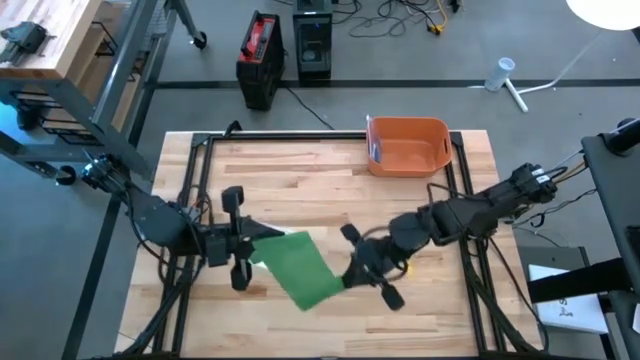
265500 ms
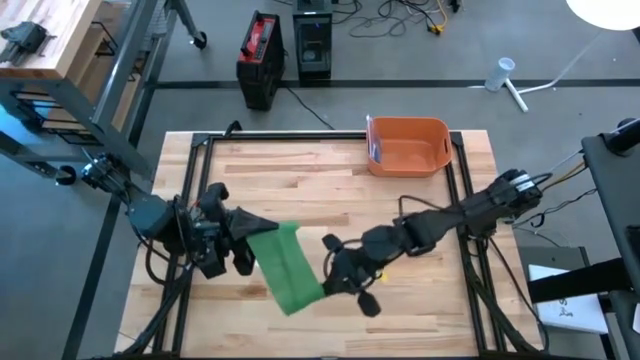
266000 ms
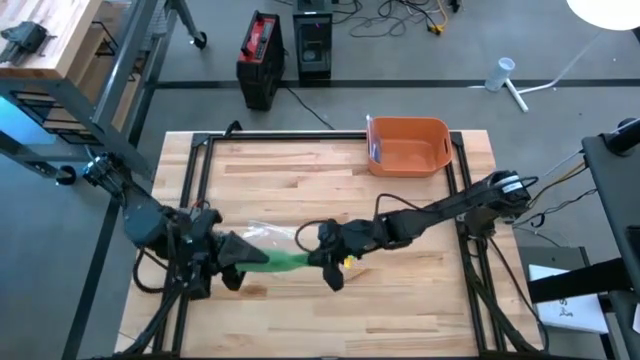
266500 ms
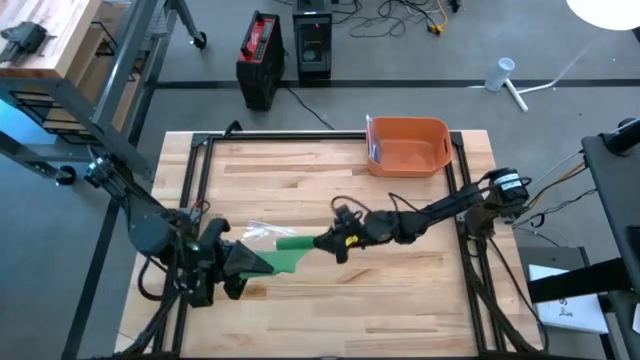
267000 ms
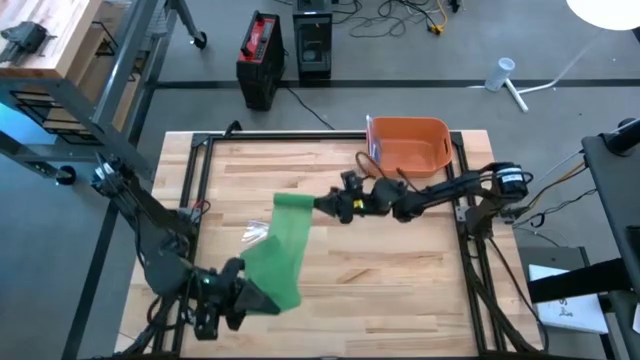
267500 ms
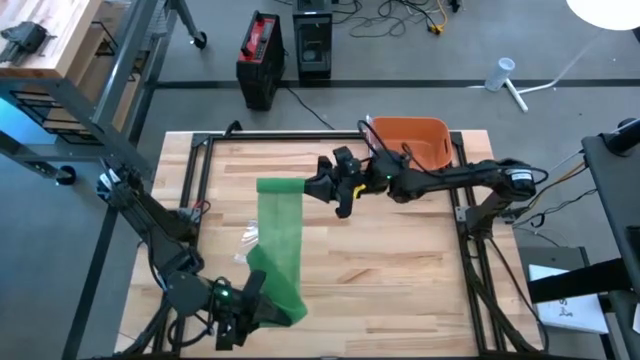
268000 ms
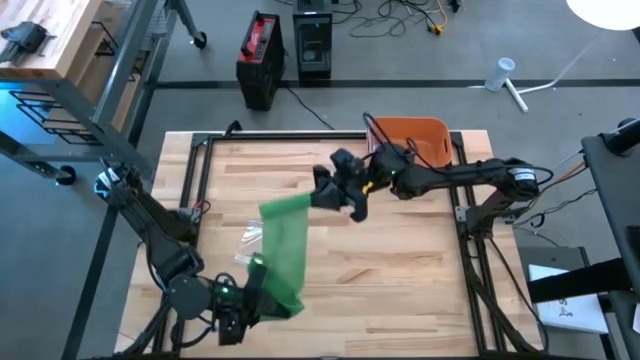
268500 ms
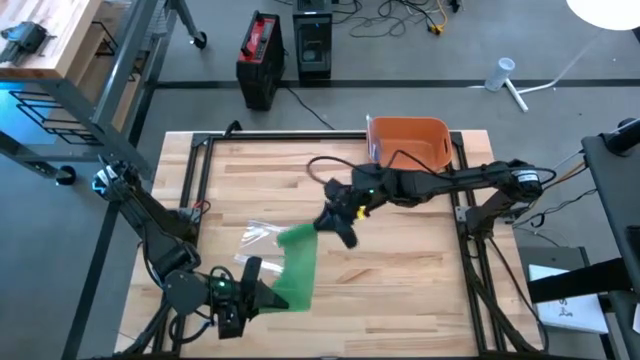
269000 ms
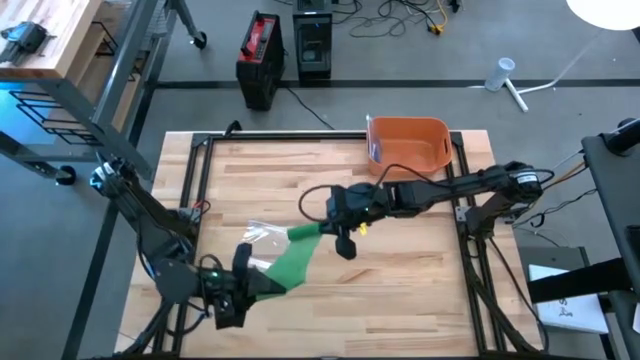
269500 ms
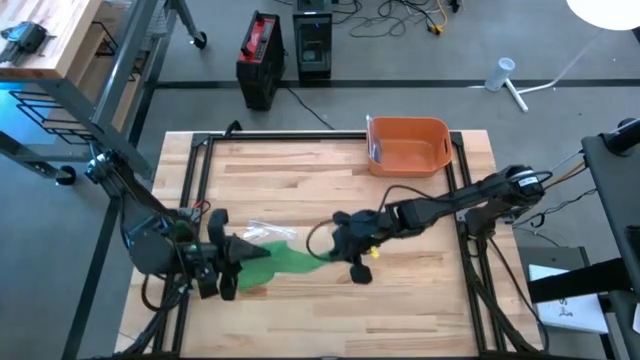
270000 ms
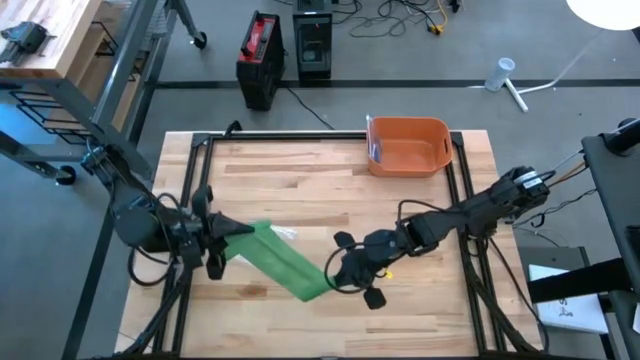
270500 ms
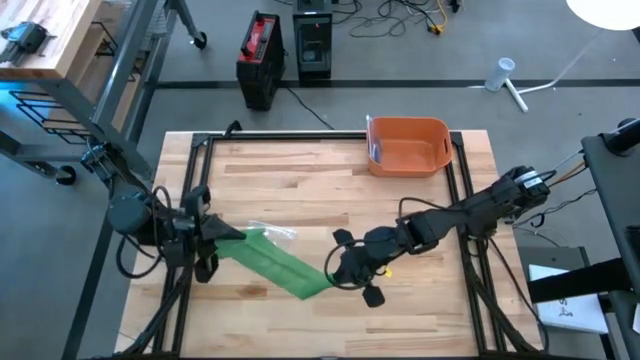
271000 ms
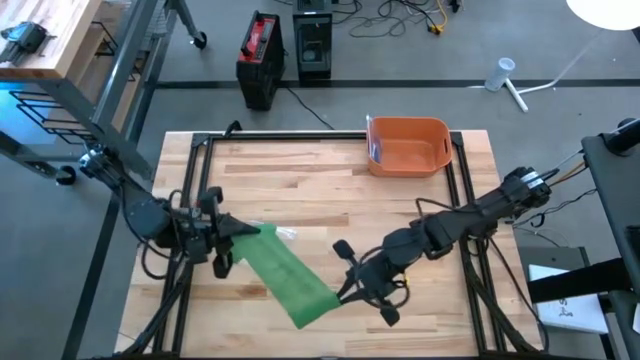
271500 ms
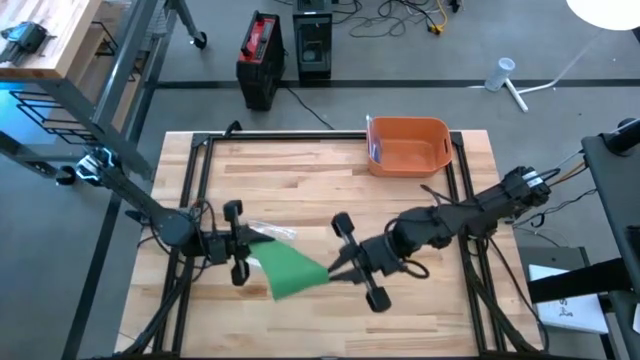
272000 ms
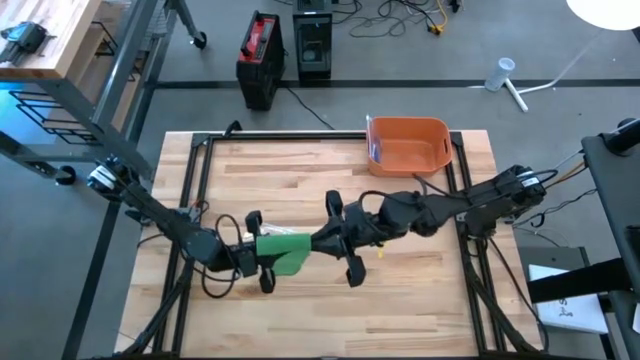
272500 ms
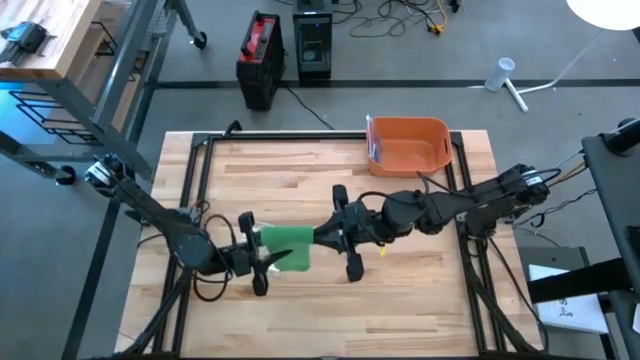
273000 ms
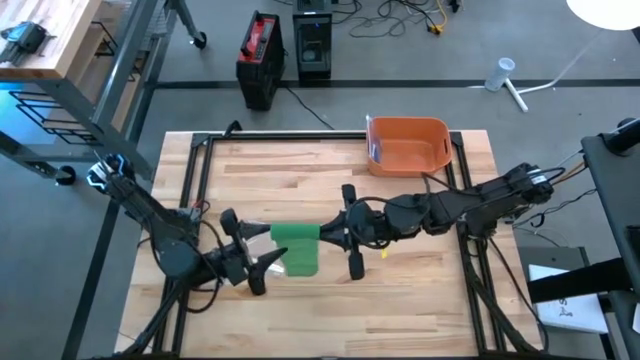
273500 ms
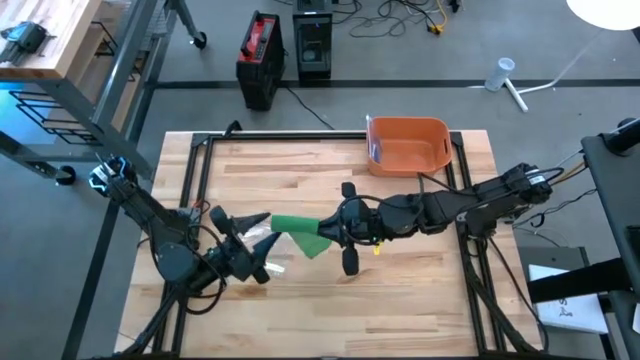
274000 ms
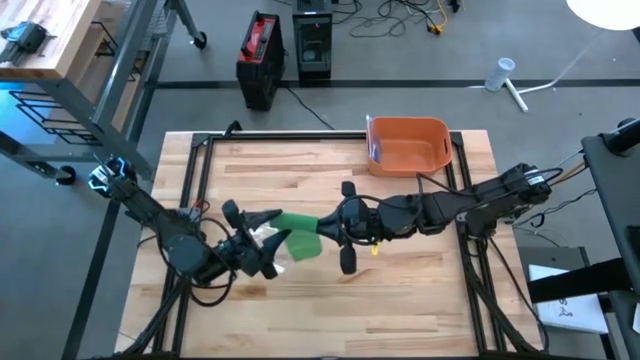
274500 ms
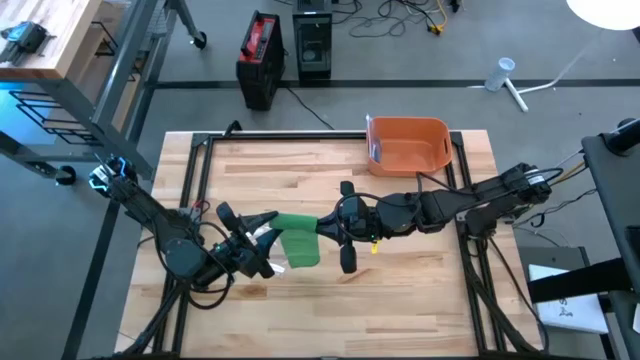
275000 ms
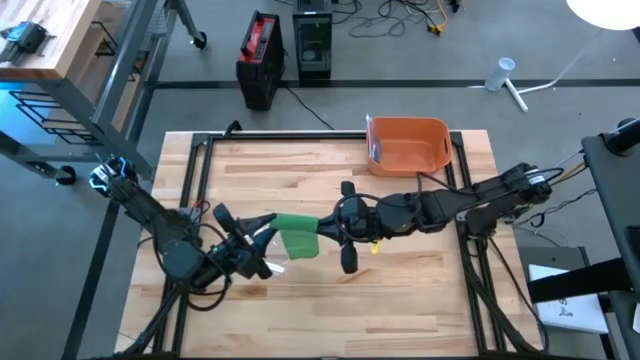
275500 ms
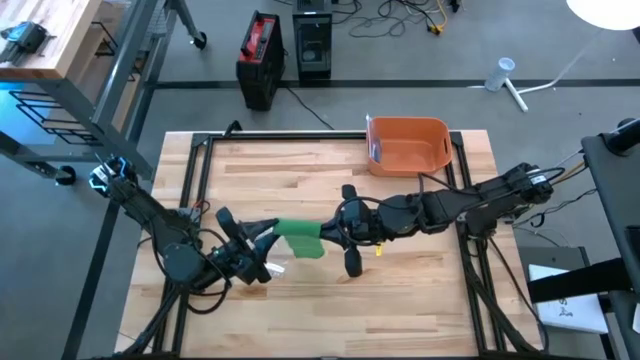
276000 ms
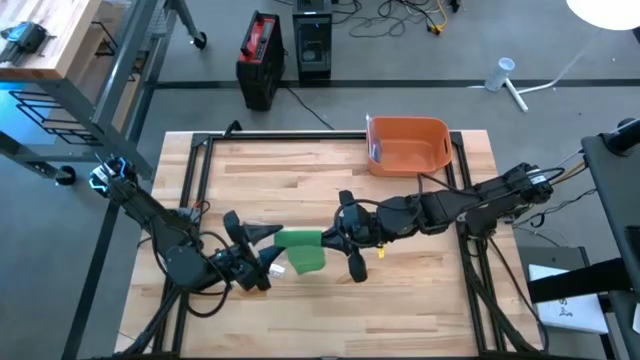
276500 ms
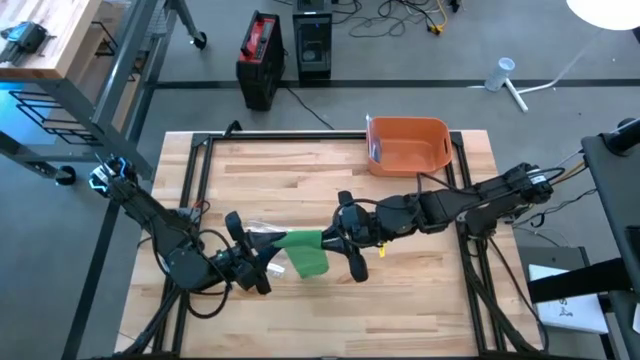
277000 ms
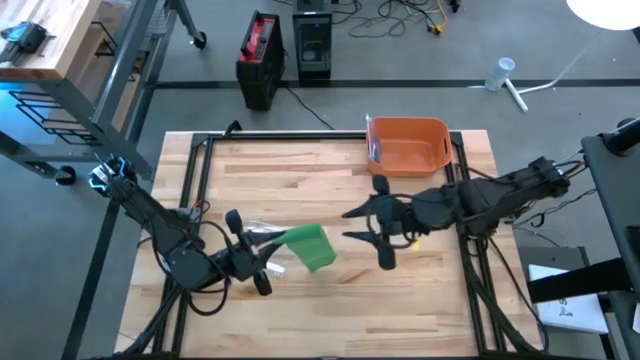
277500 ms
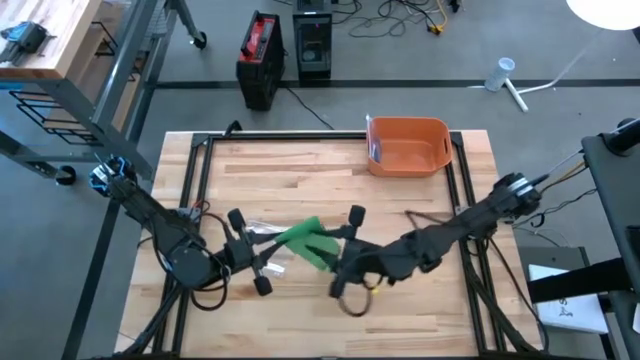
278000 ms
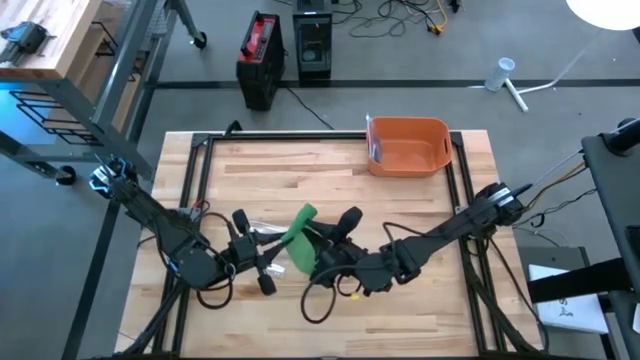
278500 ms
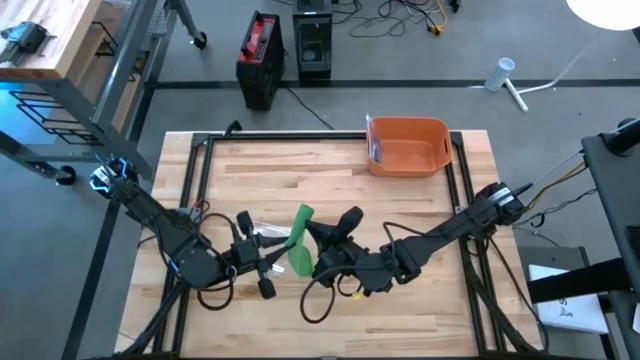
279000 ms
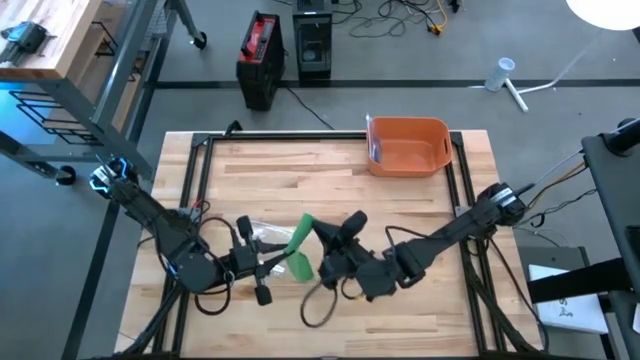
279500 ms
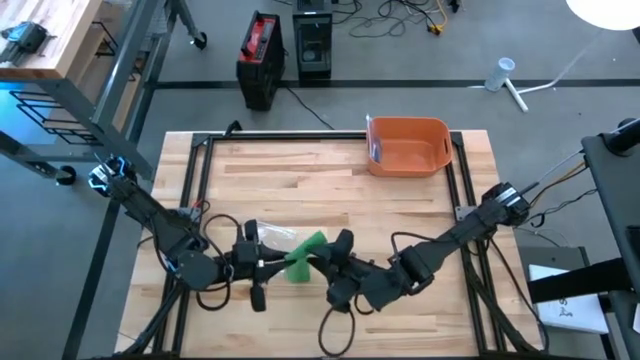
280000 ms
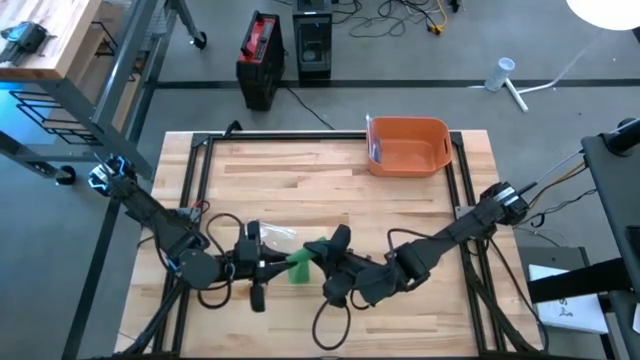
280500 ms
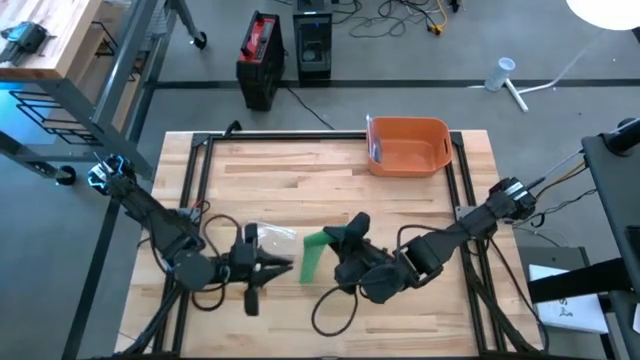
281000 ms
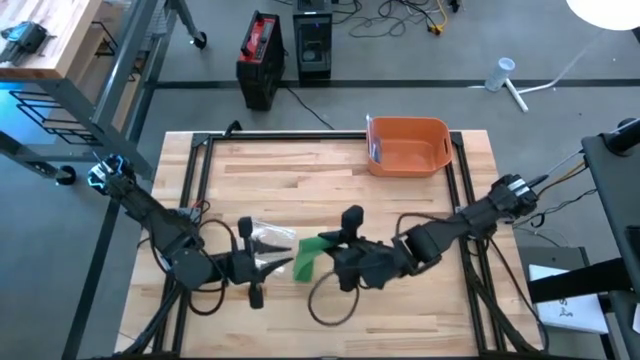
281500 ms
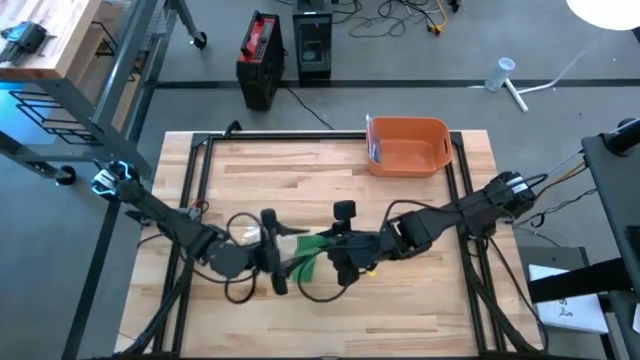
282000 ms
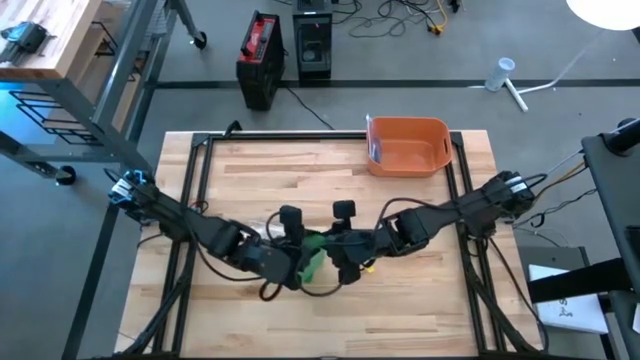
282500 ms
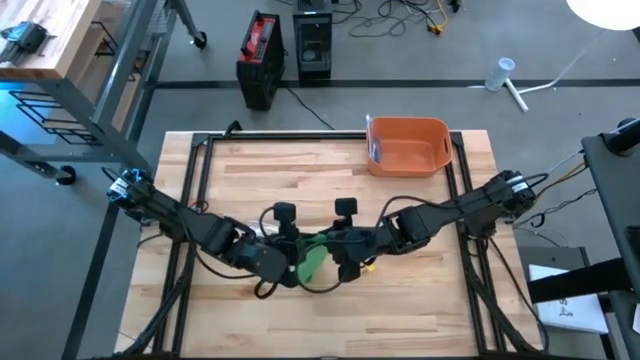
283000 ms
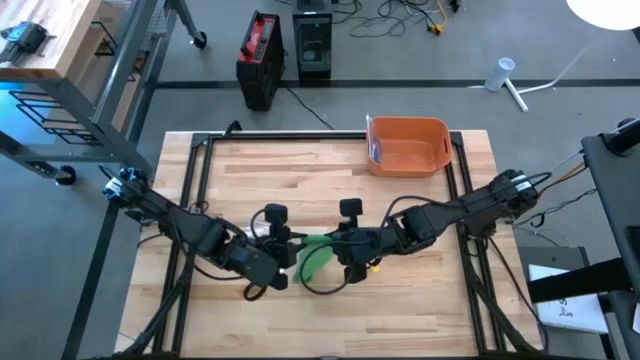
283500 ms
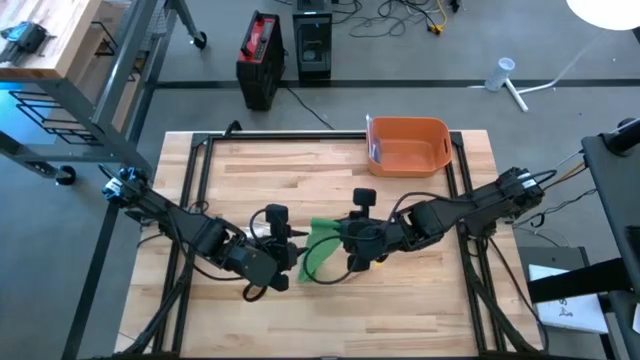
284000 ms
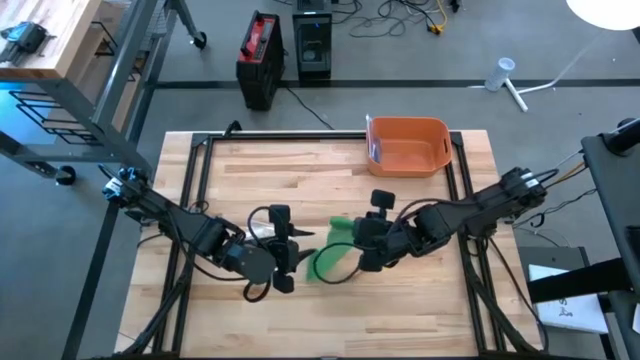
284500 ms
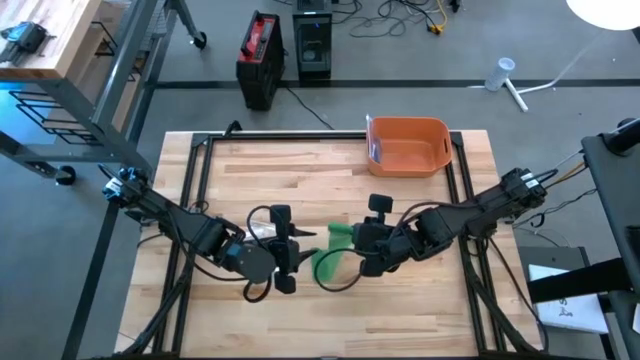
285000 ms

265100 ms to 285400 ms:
Task: Roll bandage
Roll the green bandage
